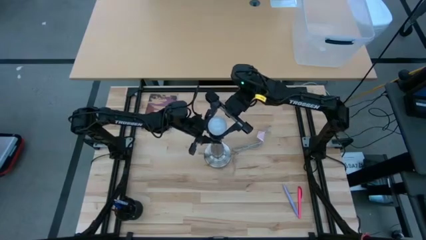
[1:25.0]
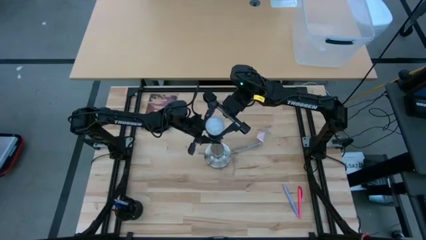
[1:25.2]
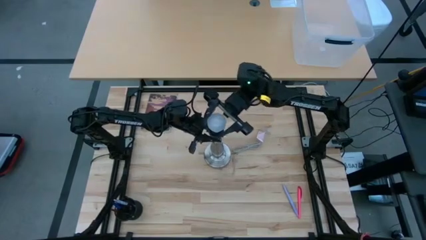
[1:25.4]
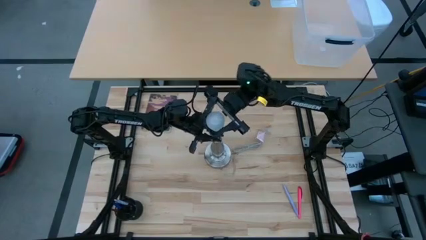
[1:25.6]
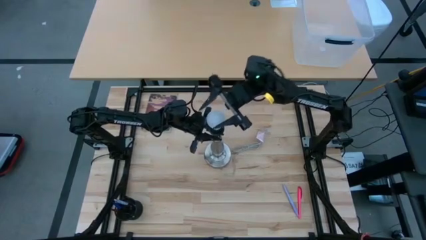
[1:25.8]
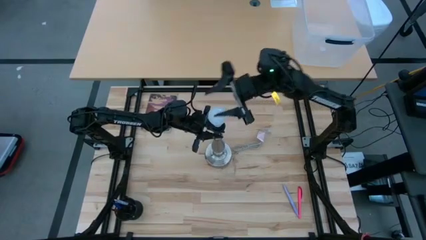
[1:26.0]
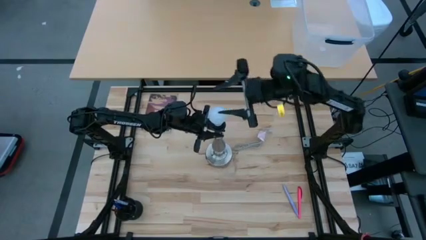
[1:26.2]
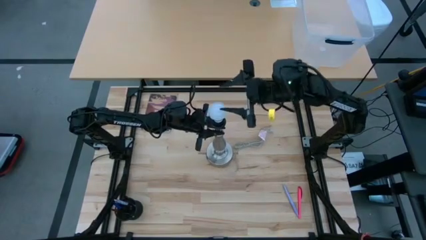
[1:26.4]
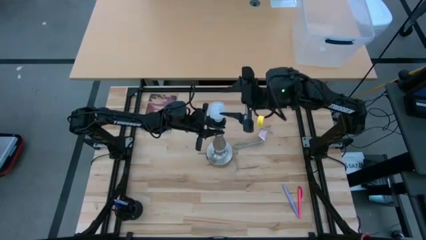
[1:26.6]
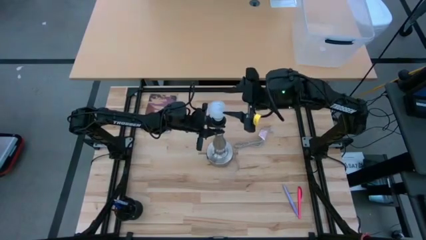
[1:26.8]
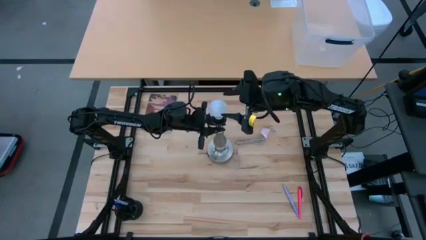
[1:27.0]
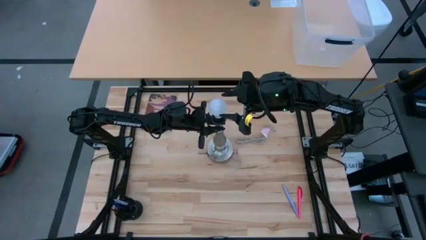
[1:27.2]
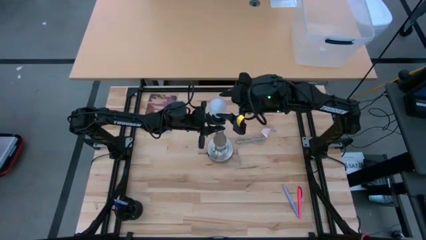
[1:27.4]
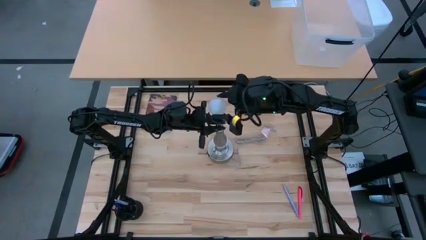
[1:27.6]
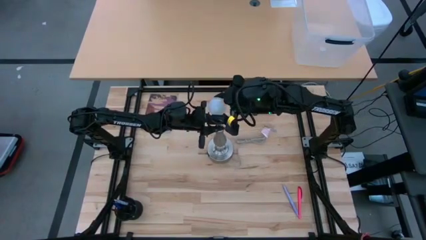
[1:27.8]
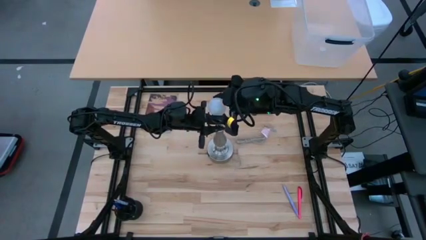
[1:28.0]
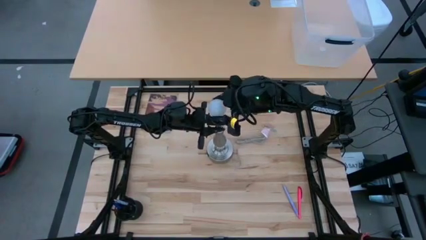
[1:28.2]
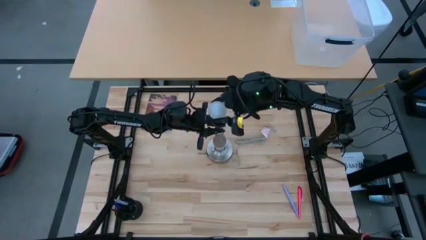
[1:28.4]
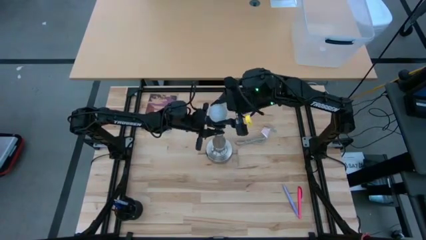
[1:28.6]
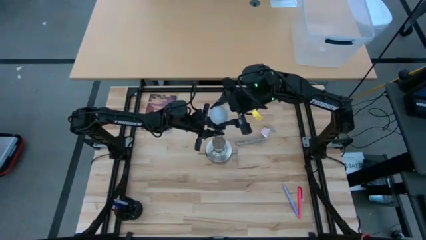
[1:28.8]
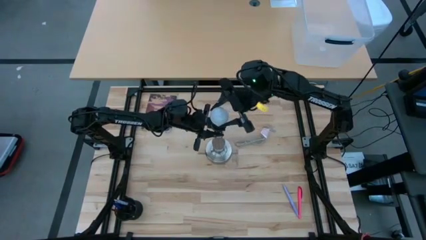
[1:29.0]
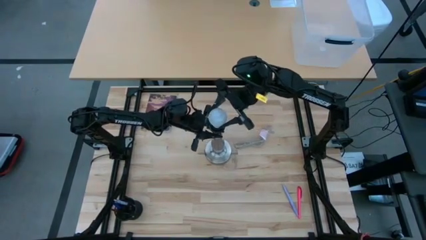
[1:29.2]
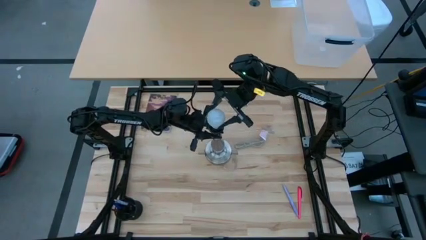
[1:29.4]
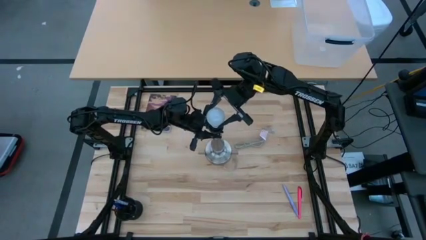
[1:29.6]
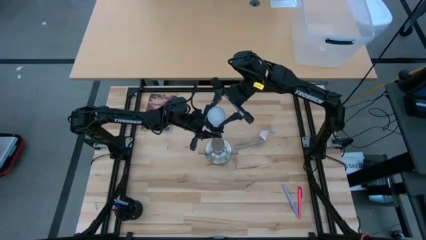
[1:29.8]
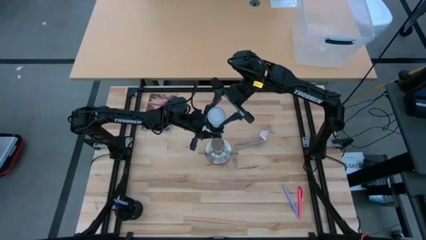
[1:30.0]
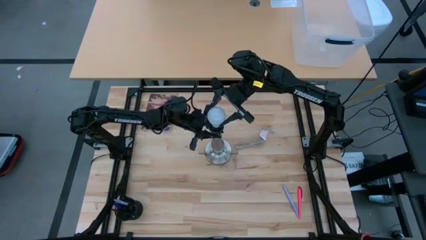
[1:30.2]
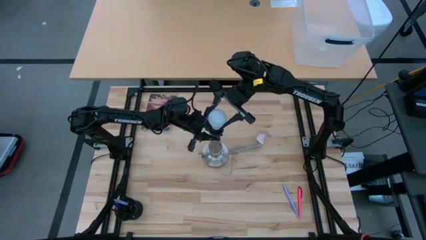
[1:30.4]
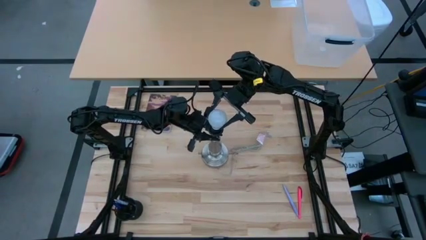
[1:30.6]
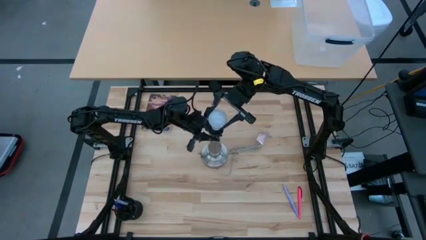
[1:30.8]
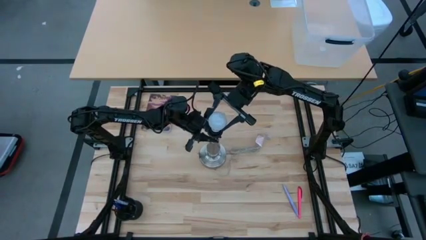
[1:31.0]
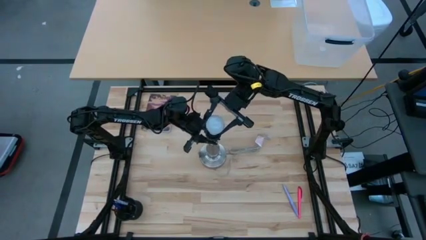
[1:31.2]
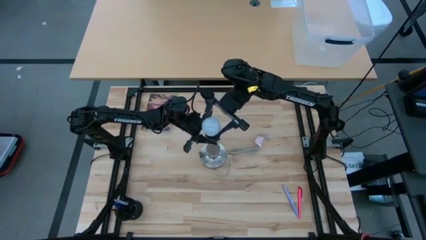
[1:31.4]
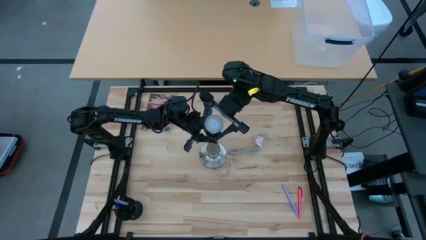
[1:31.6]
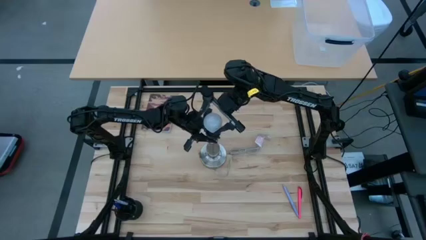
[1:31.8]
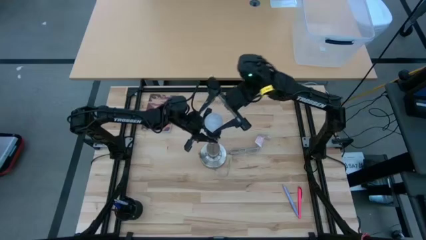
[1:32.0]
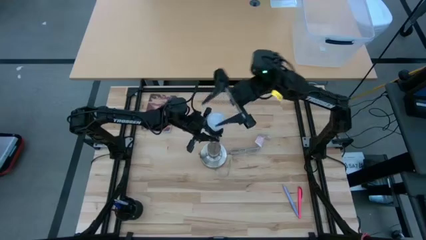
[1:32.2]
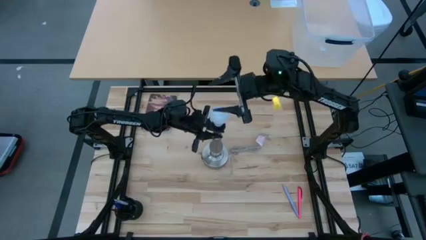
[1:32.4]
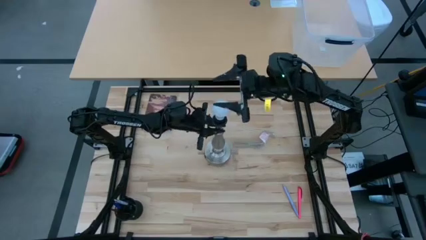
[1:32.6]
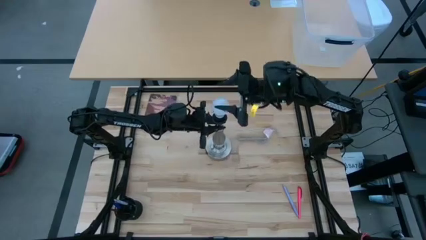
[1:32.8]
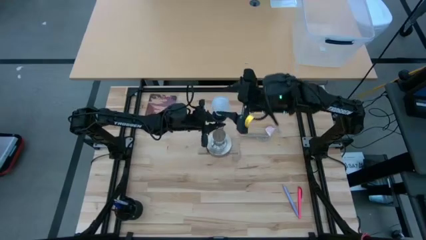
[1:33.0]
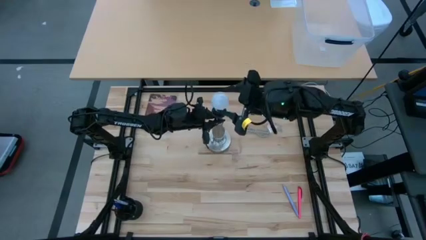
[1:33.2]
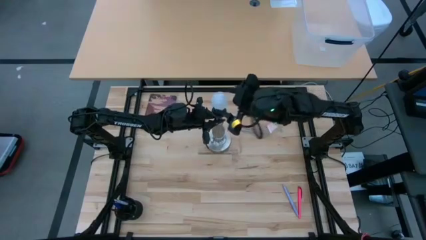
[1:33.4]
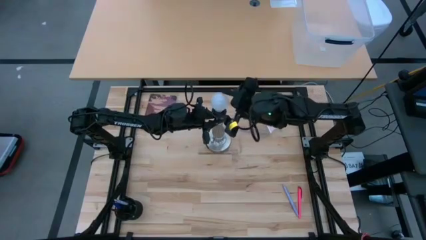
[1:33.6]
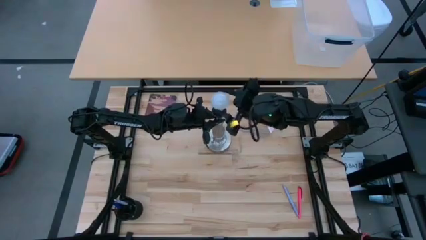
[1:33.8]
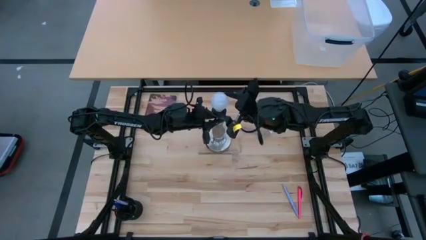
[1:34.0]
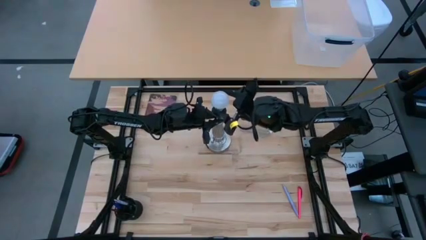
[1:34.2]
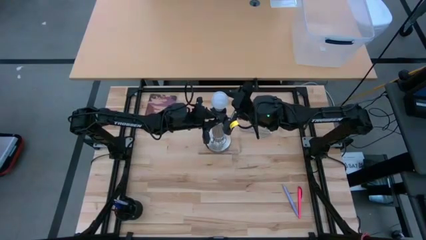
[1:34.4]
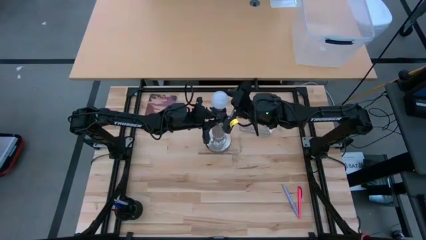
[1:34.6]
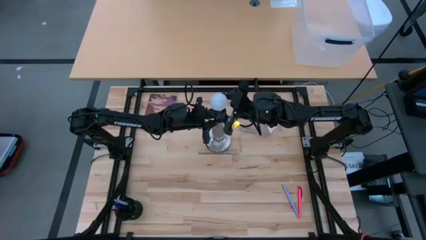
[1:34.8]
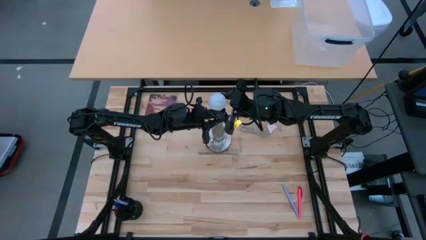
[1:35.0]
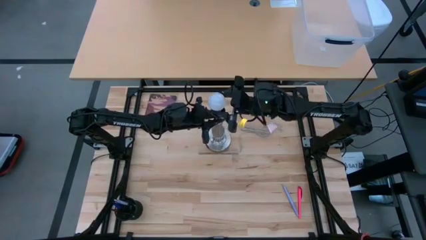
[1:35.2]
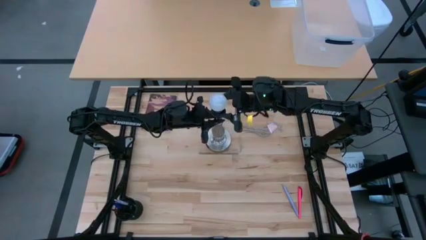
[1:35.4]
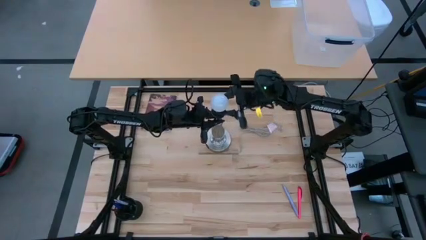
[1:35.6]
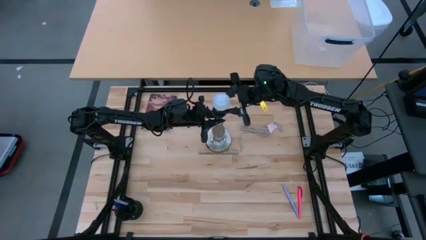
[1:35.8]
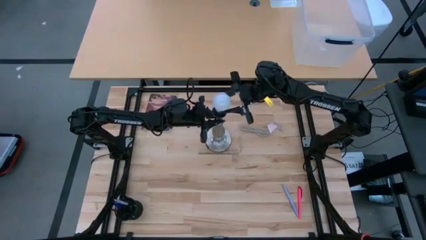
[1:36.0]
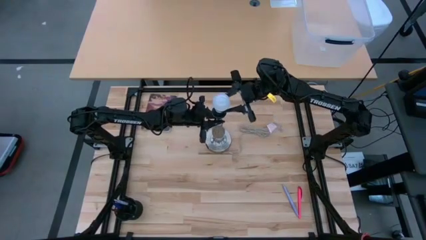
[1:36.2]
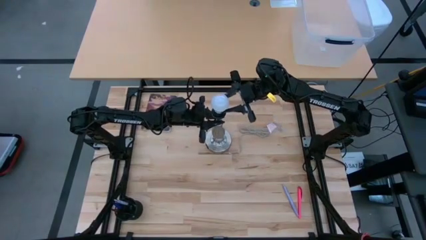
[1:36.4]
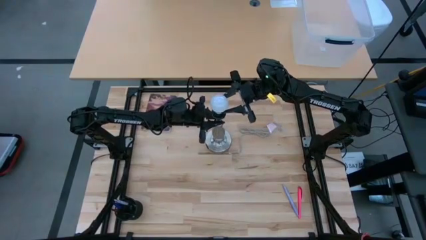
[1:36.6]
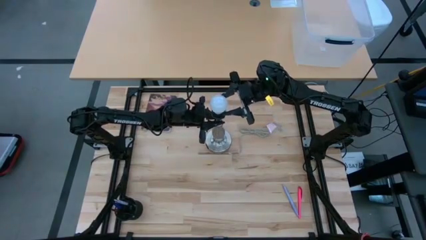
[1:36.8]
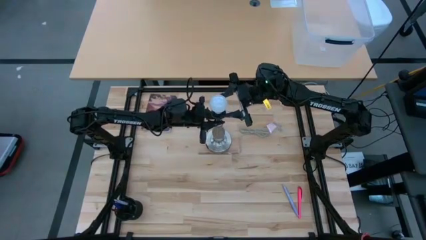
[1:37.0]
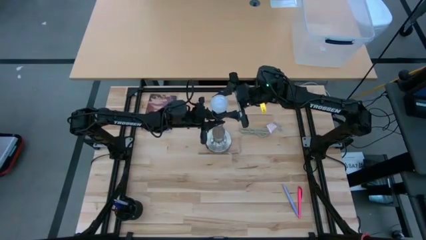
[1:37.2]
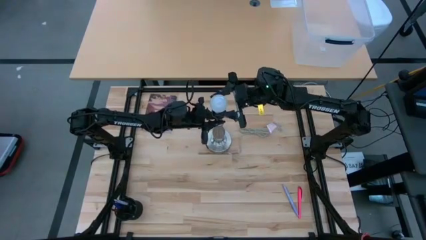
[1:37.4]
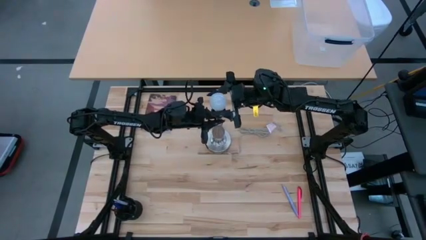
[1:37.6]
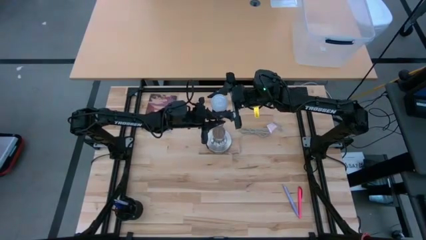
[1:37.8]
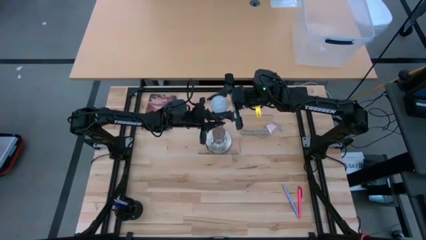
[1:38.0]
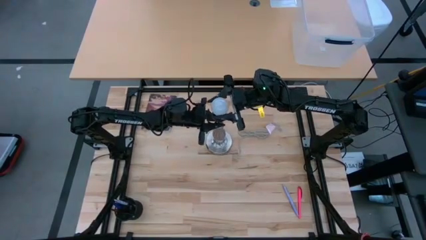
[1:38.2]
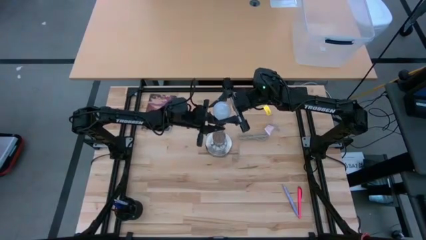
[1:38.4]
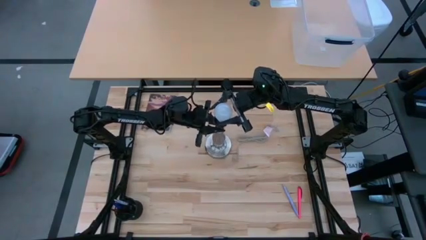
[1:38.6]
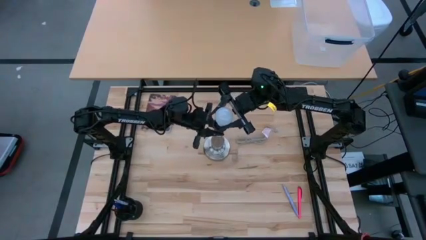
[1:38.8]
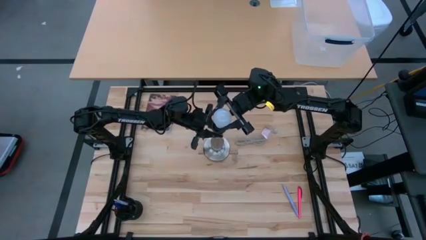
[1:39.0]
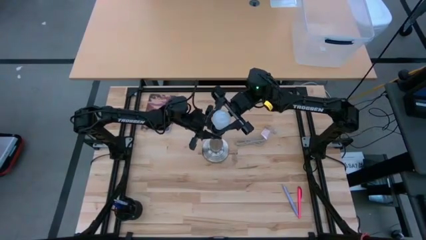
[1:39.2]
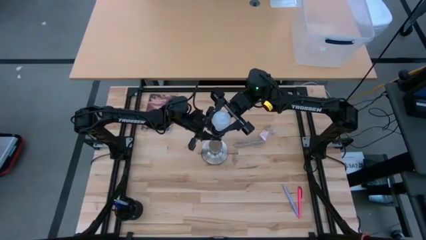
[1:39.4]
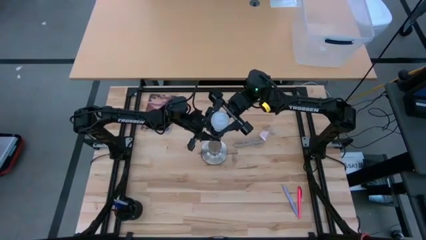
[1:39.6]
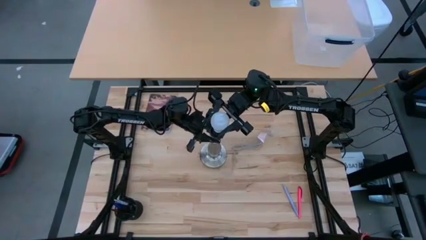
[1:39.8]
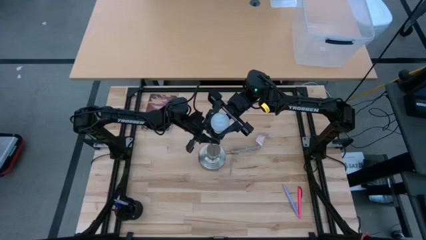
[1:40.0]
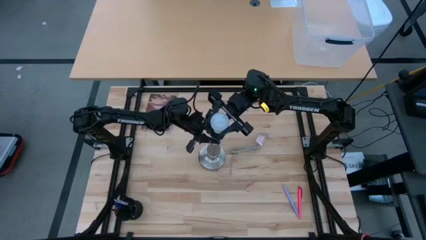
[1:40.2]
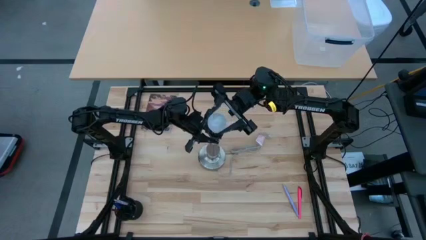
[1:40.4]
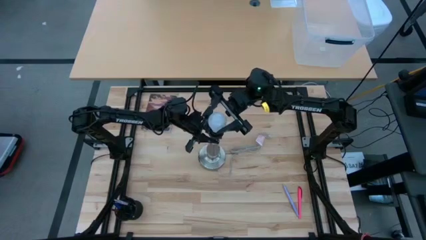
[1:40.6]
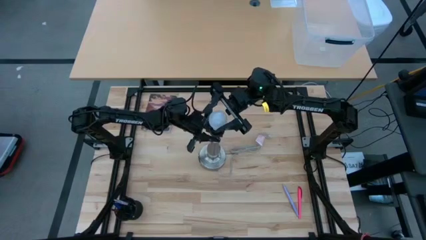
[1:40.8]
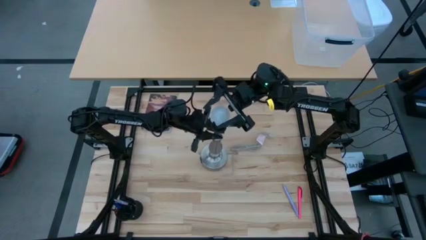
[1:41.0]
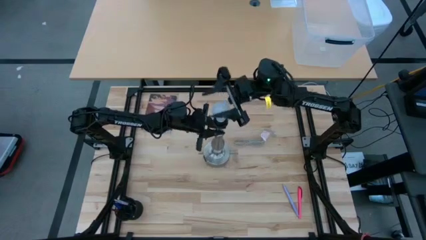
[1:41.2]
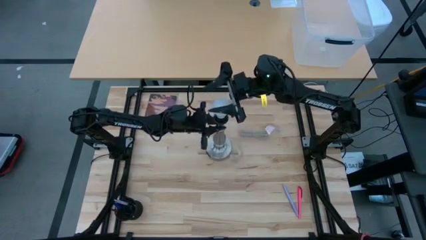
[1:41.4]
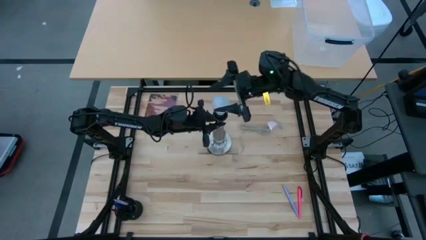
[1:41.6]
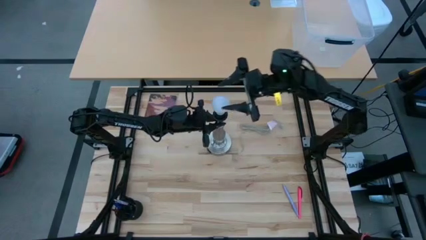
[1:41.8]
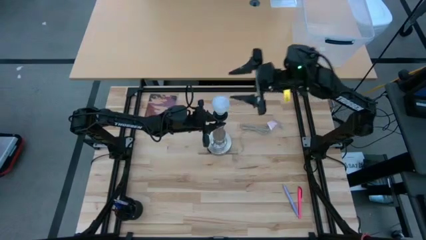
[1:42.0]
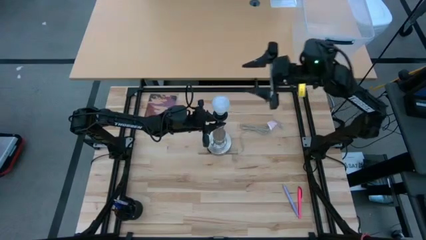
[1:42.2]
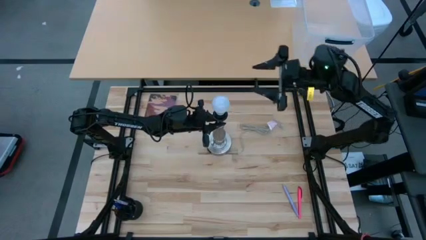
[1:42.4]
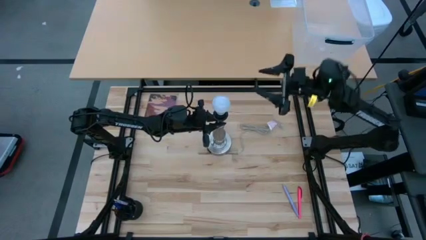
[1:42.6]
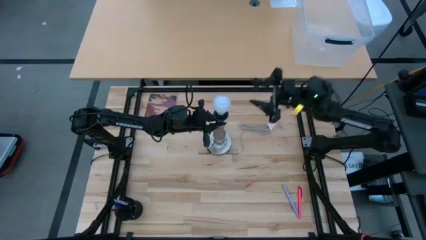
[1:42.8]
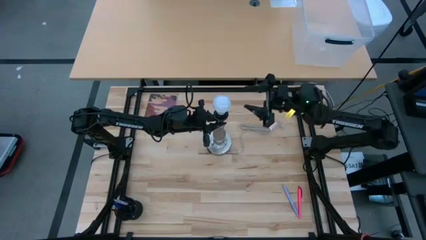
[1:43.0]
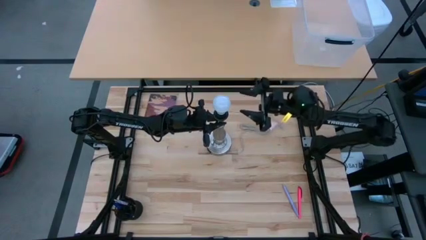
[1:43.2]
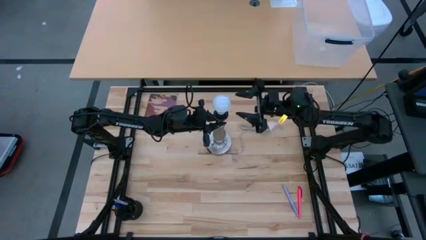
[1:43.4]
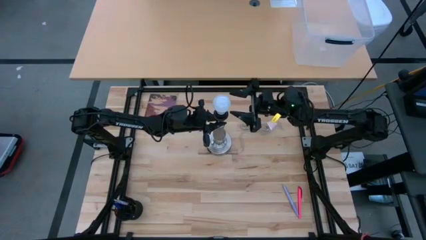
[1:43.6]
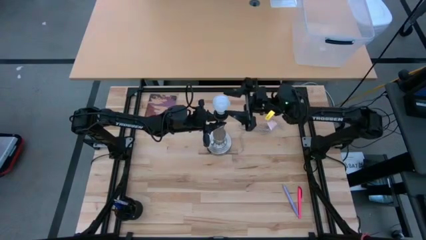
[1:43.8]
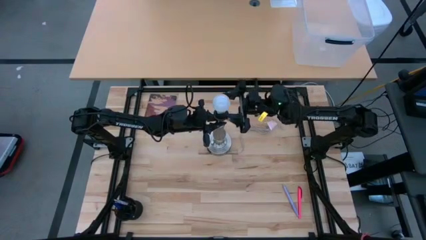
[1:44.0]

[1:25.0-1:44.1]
Task: Screw lightbulb
Remove the lightbulb from the lamp
